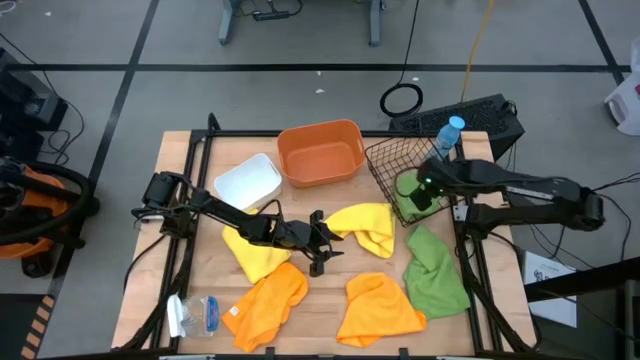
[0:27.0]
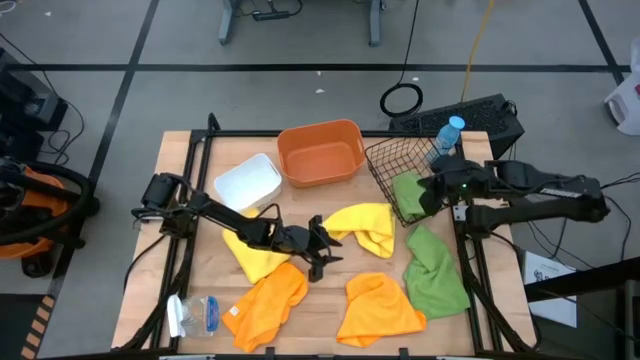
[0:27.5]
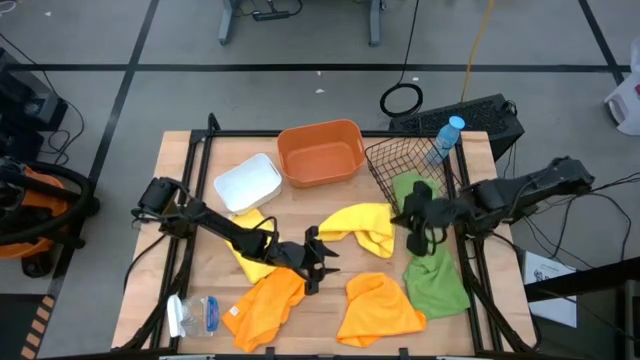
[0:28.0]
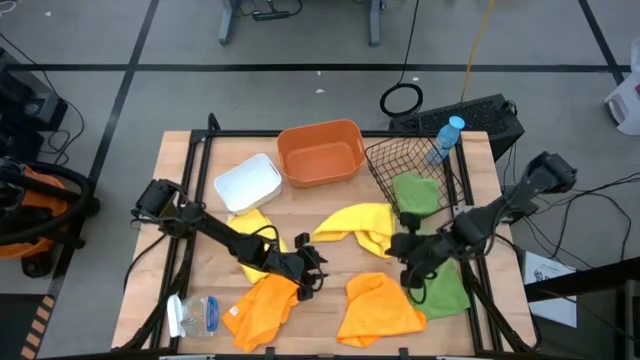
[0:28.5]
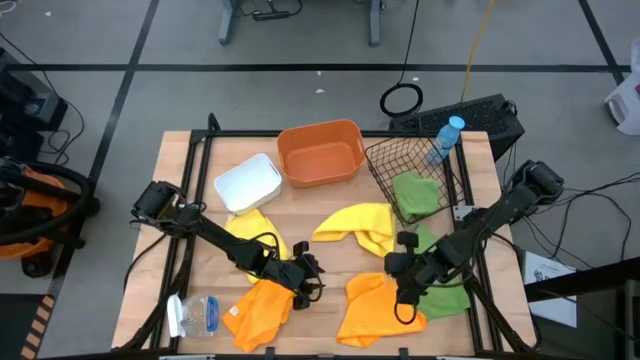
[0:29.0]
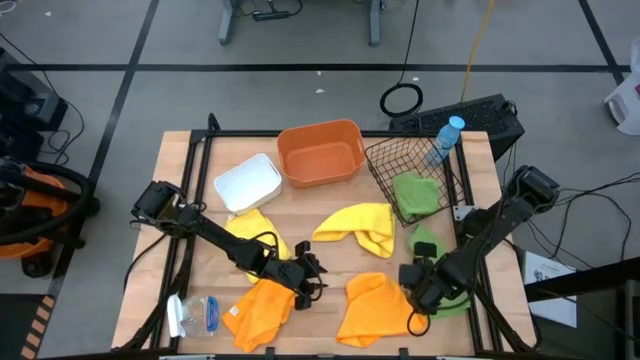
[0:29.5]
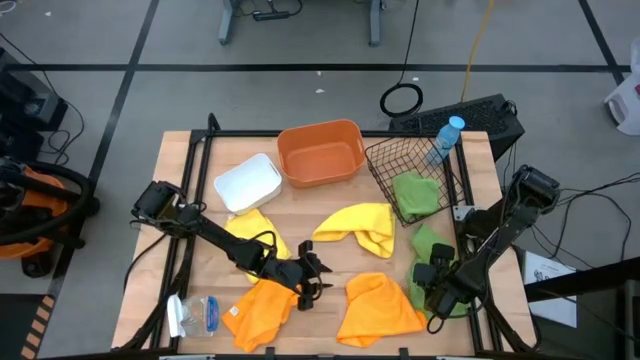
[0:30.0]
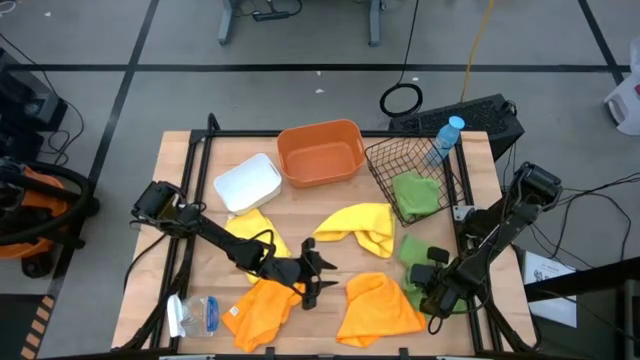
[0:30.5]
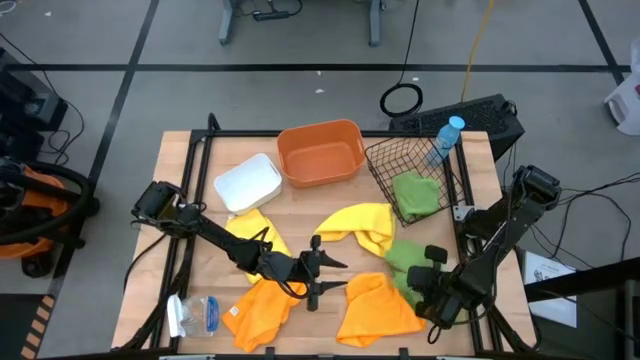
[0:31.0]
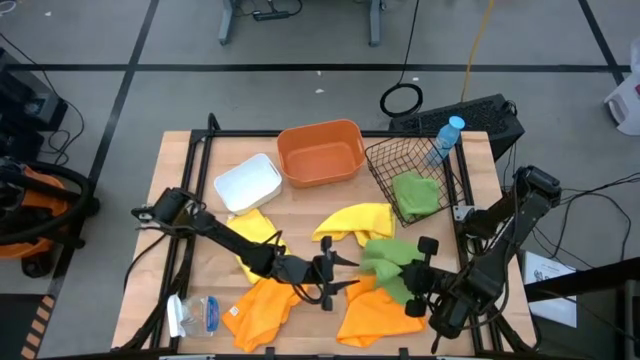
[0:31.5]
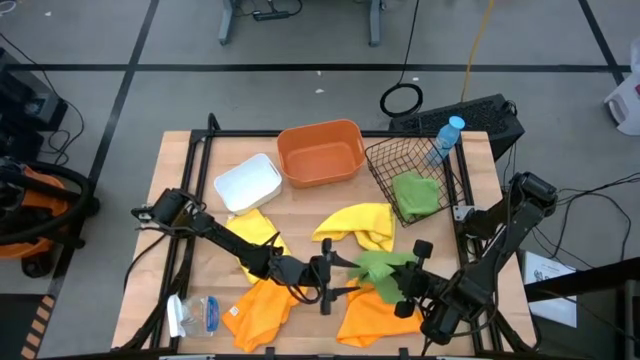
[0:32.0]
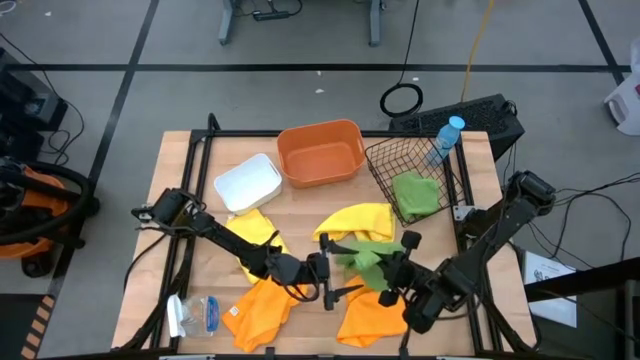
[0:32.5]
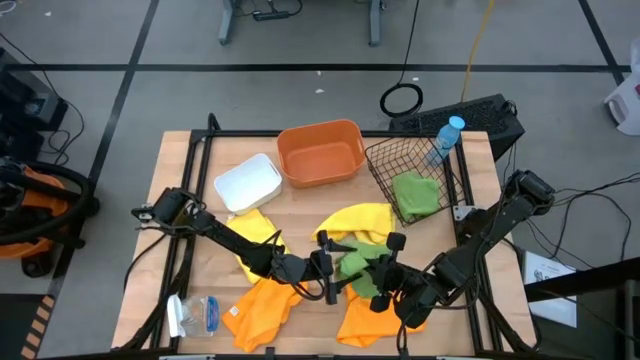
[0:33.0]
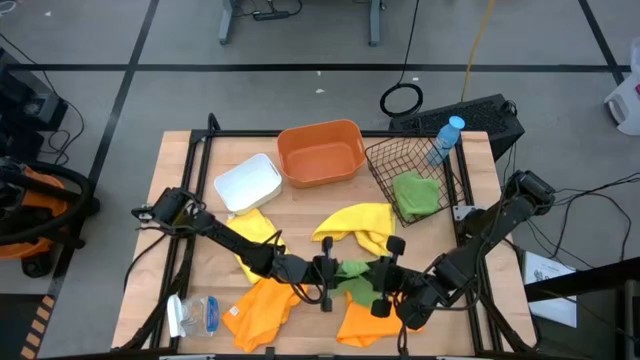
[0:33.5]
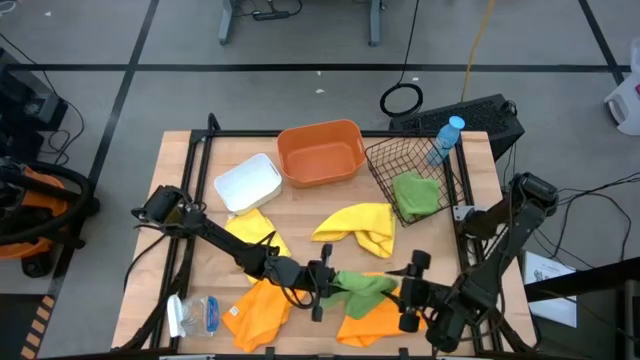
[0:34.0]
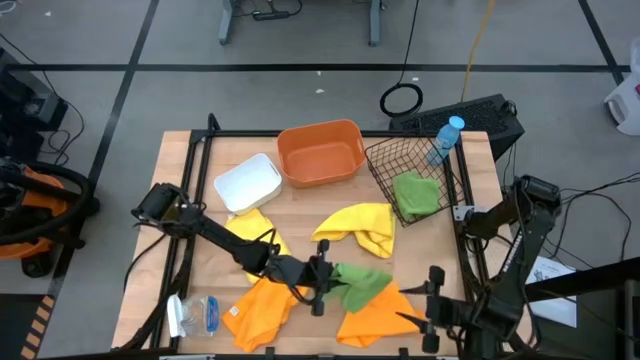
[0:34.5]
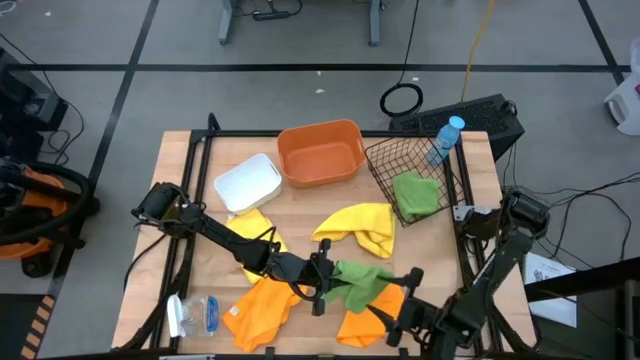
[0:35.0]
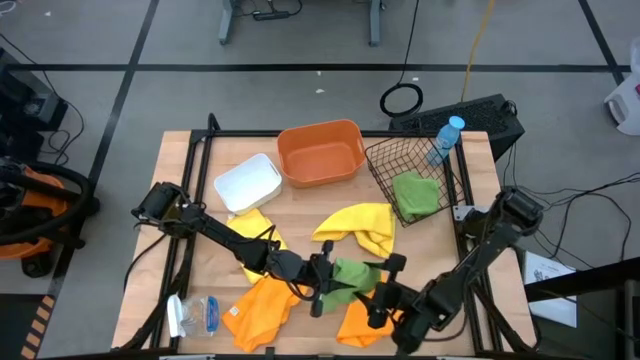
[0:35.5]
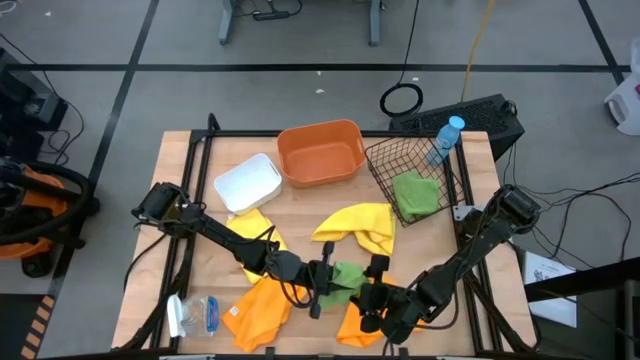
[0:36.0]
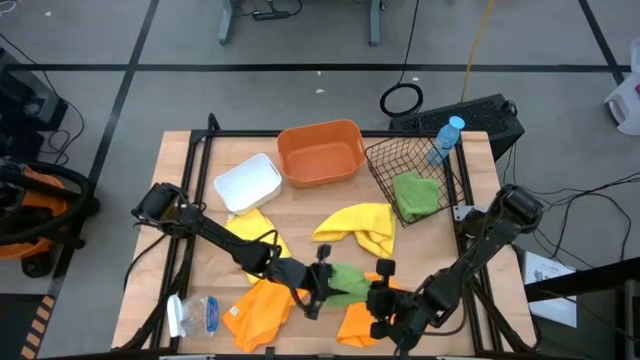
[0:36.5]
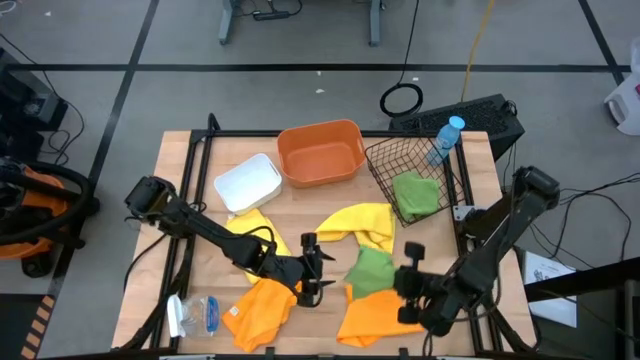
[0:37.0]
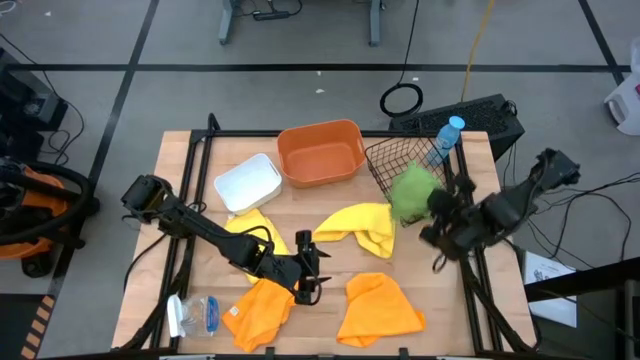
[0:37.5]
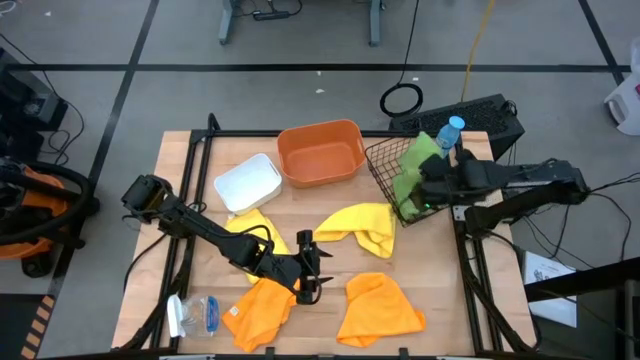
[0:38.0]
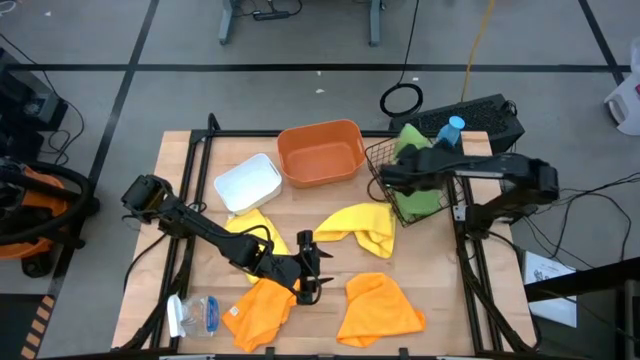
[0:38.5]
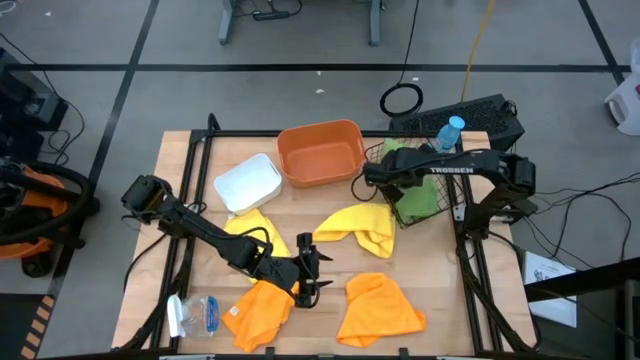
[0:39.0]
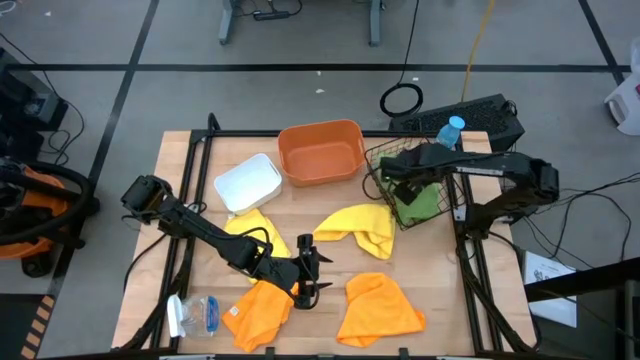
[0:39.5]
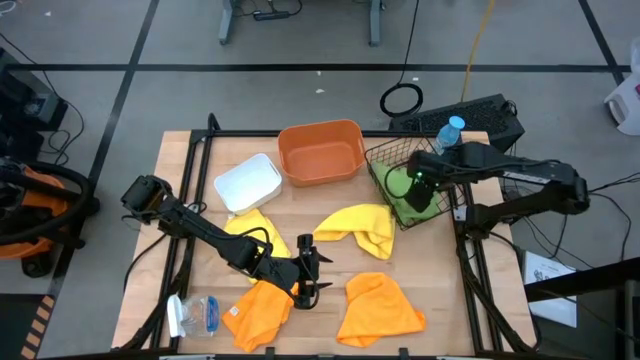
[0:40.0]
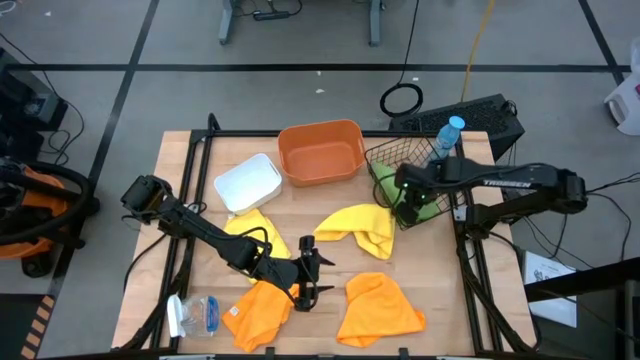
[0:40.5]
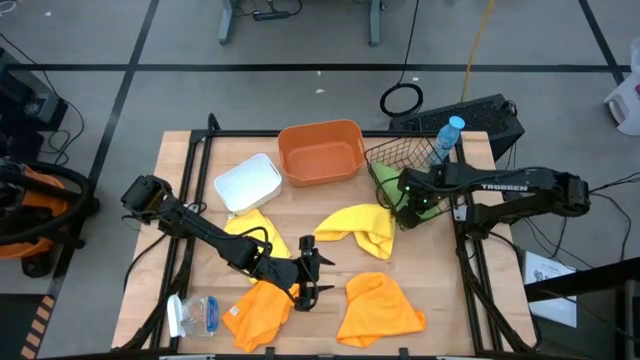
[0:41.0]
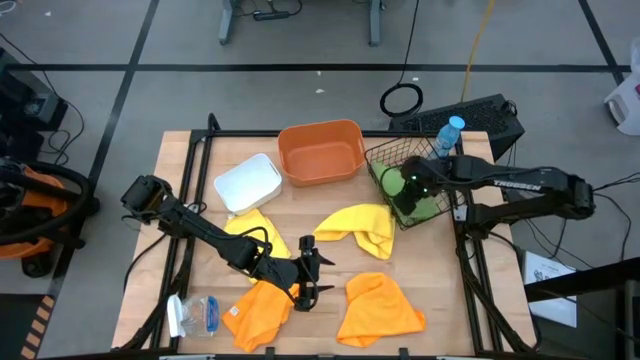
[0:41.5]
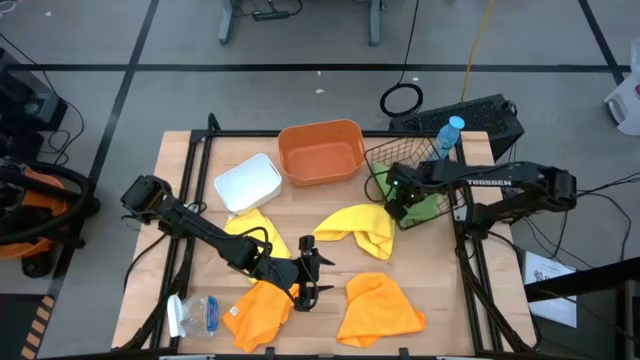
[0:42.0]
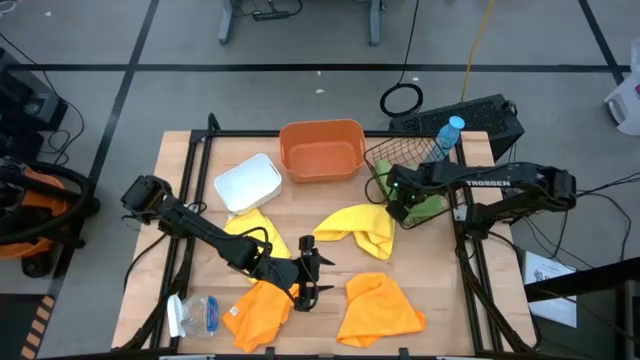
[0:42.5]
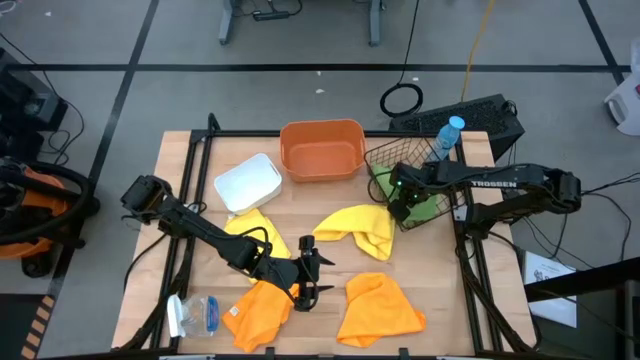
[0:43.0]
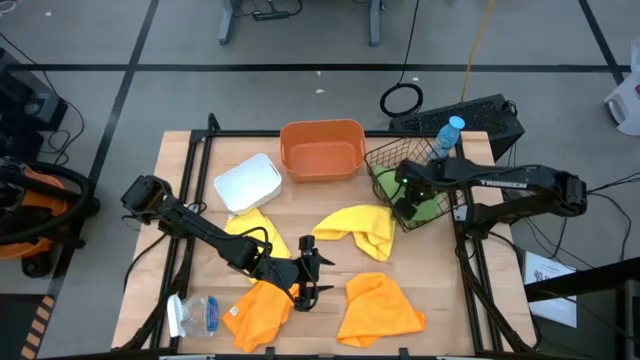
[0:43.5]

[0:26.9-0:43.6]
Task: Sort microfiber towel by color & place in baskets
Put the green towel into the wire basket

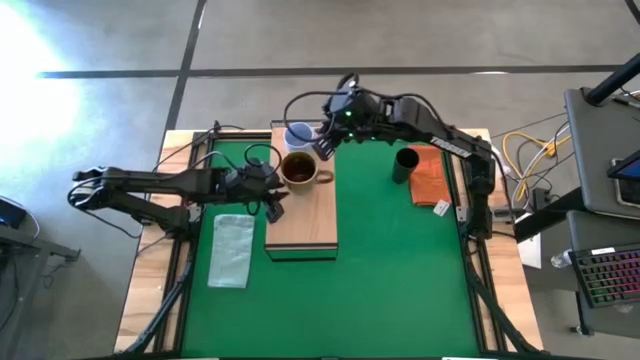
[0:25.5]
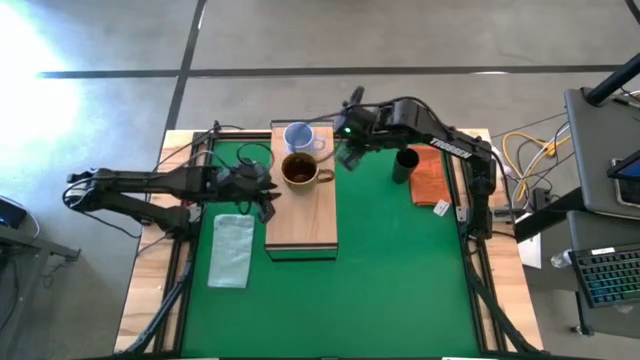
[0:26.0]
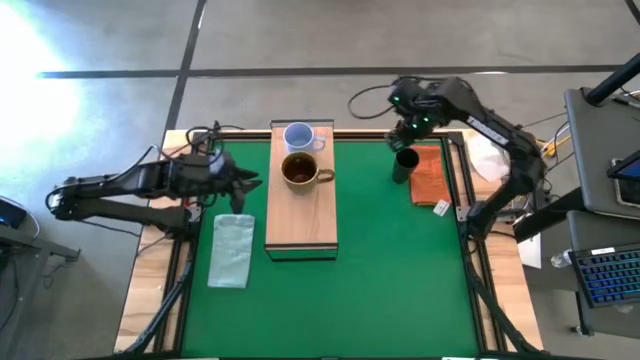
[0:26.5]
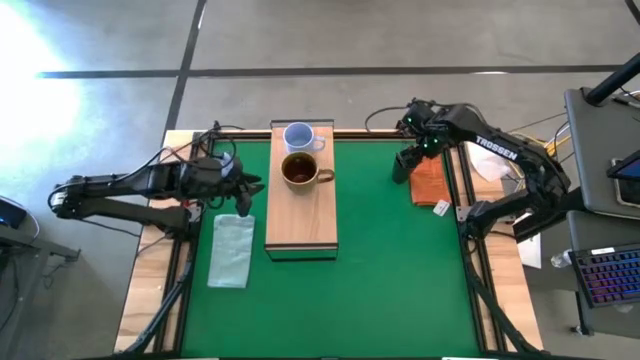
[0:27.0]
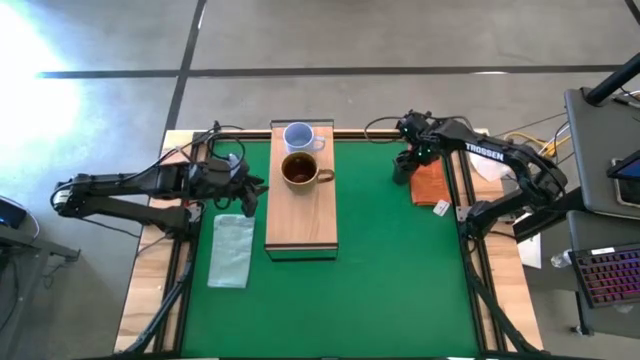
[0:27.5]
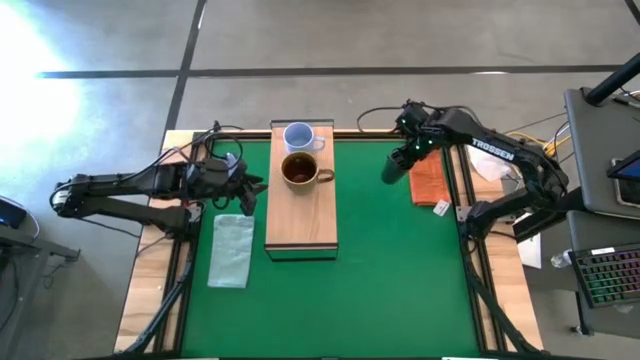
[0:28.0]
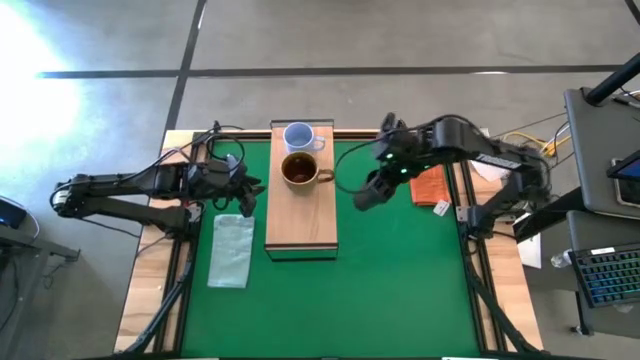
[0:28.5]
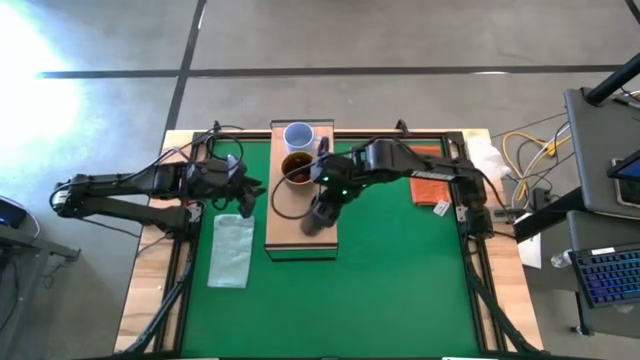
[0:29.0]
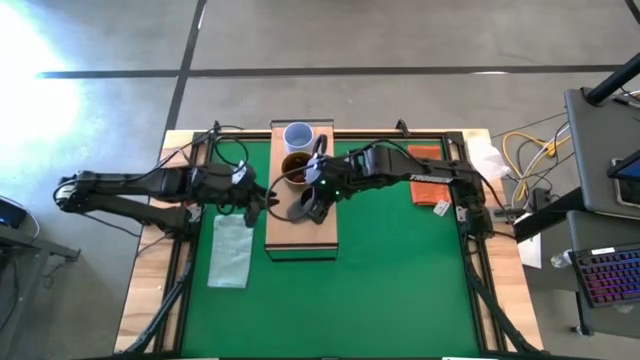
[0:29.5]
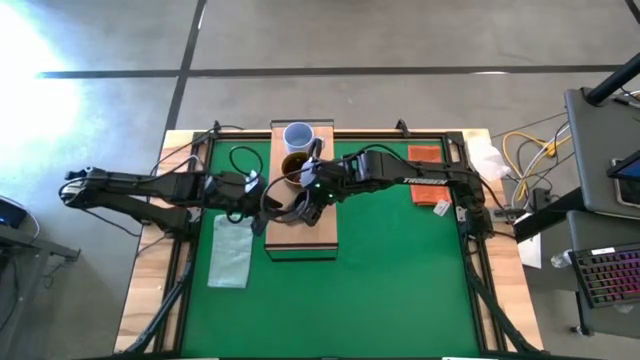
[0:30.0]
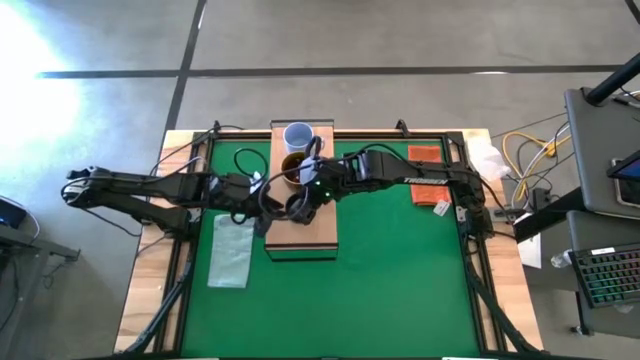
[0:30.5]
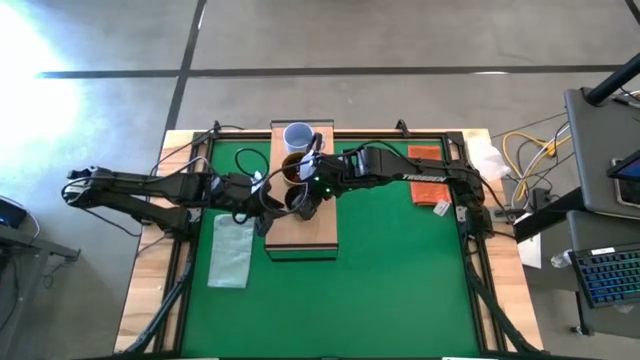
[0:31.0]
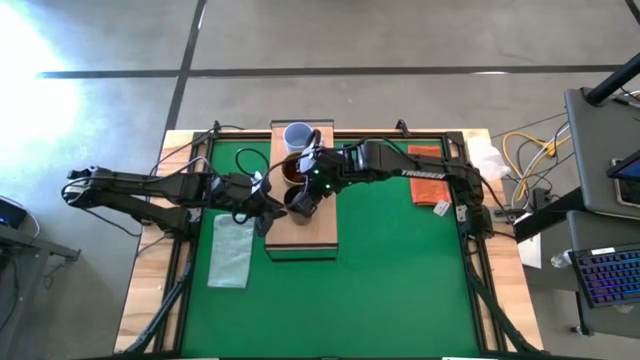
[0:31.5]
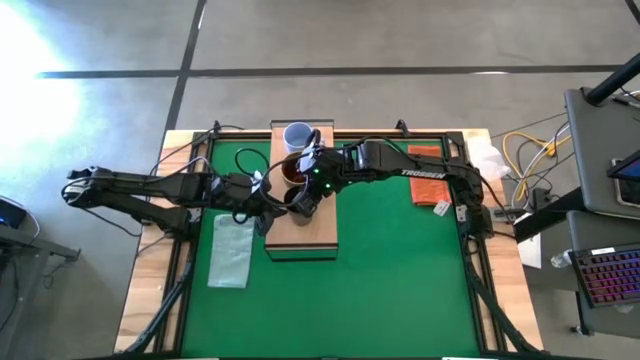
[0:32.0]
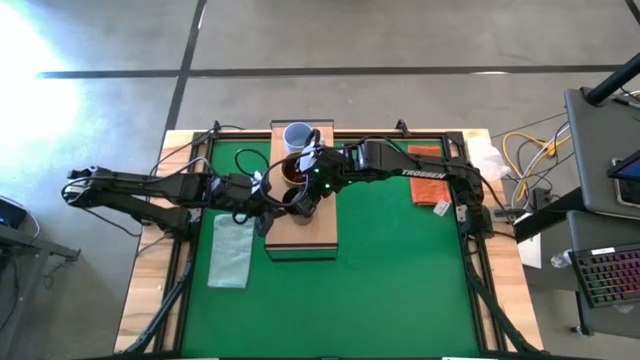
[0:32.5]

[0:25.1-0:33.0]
Task: Stack small to large cups/mugs on shelf
Put the black cup on the shelf
